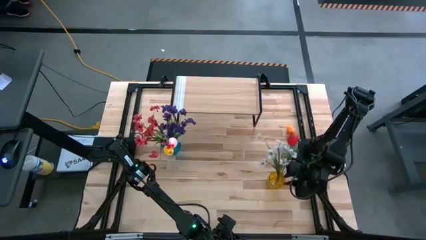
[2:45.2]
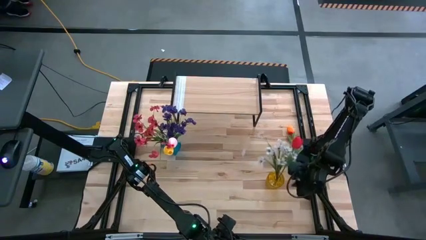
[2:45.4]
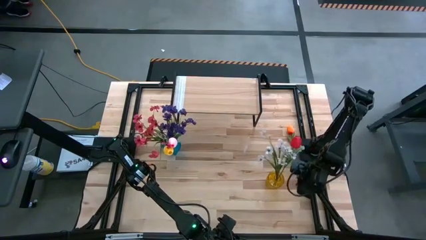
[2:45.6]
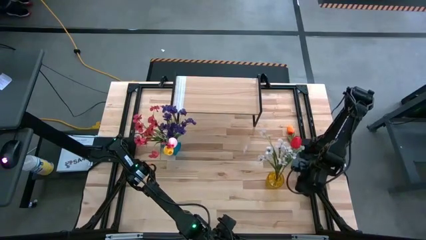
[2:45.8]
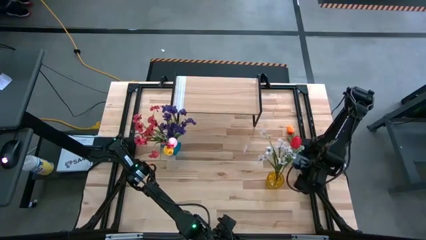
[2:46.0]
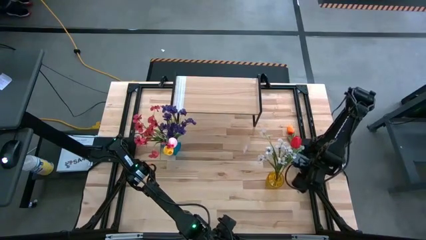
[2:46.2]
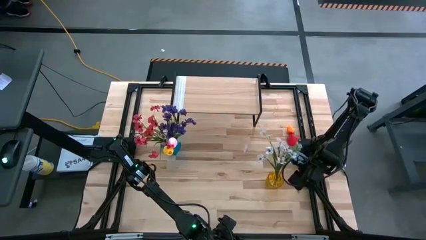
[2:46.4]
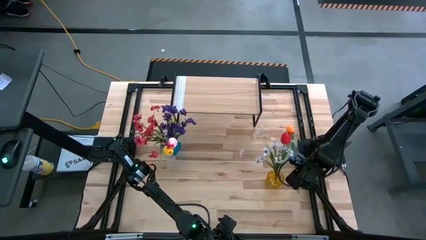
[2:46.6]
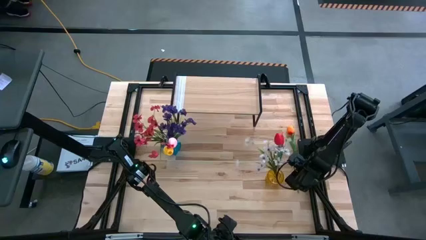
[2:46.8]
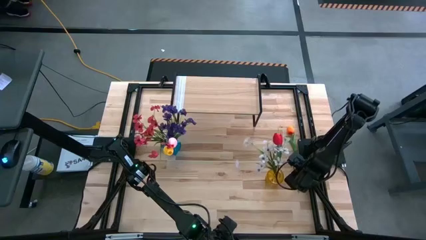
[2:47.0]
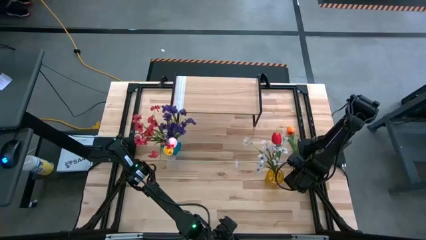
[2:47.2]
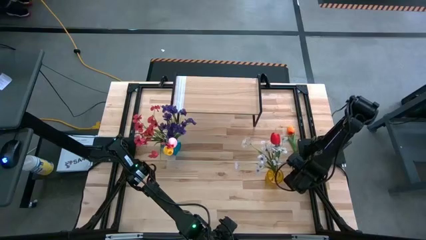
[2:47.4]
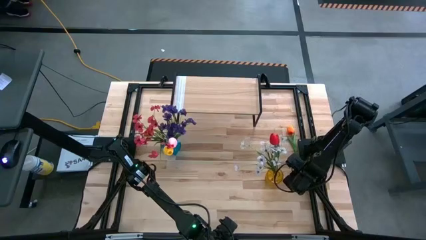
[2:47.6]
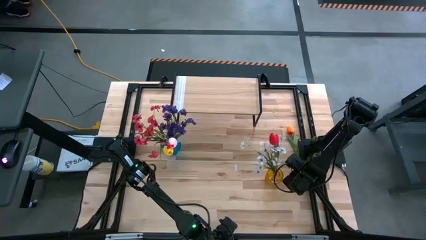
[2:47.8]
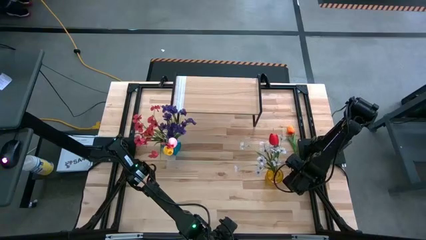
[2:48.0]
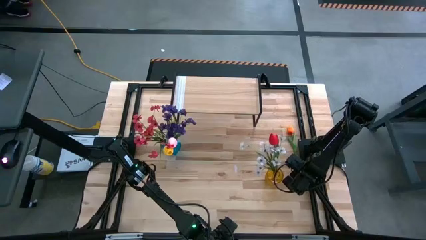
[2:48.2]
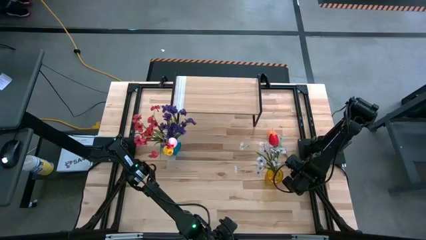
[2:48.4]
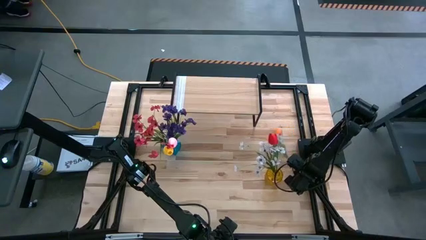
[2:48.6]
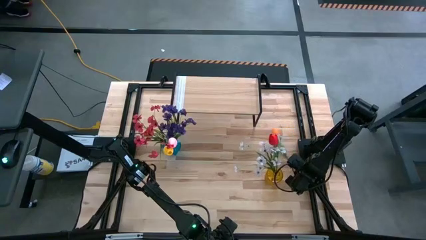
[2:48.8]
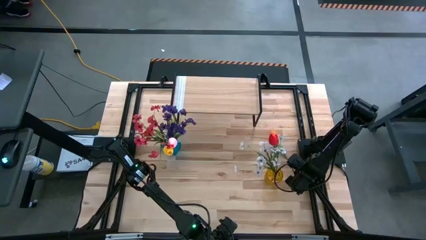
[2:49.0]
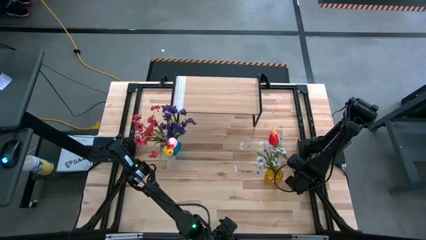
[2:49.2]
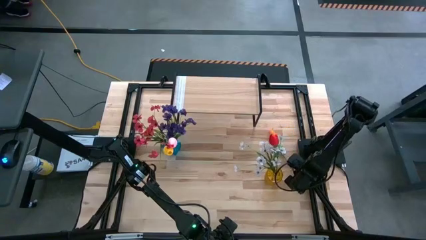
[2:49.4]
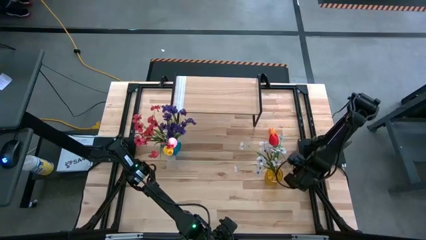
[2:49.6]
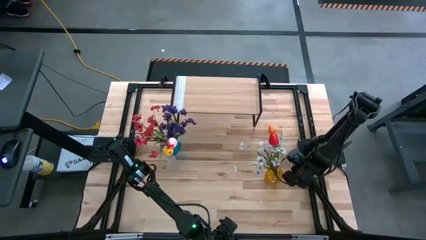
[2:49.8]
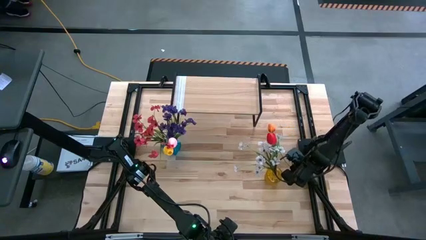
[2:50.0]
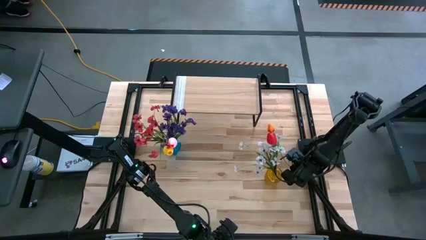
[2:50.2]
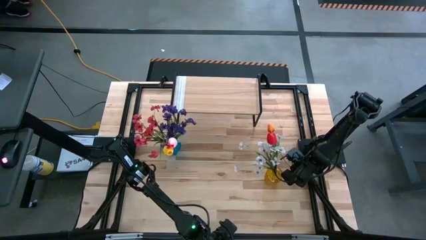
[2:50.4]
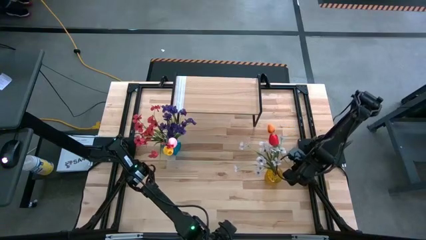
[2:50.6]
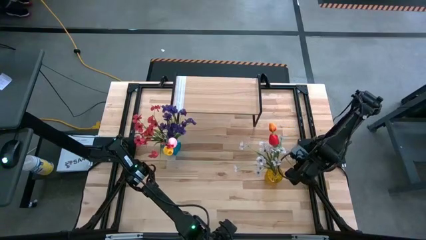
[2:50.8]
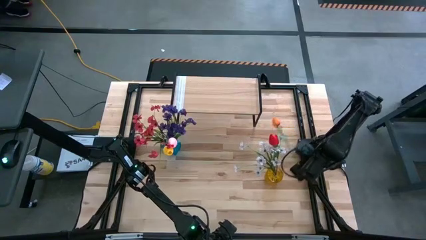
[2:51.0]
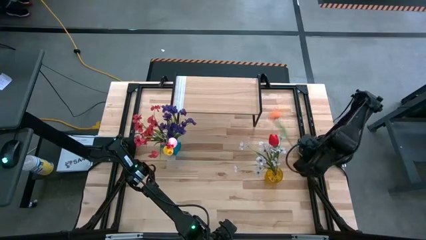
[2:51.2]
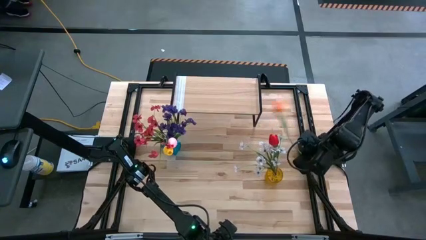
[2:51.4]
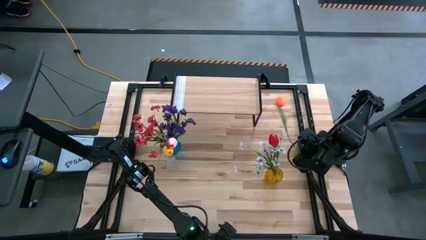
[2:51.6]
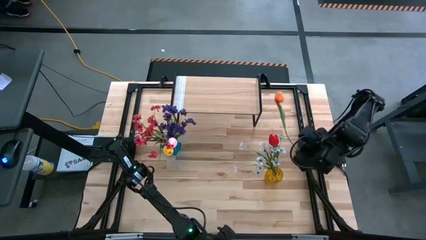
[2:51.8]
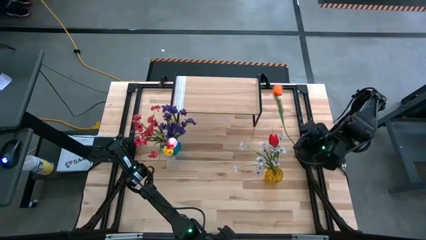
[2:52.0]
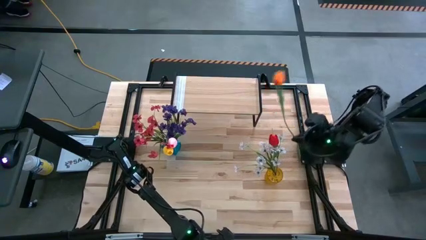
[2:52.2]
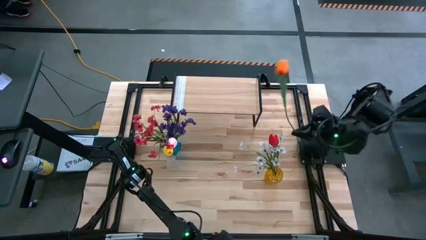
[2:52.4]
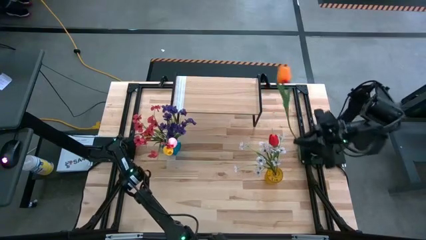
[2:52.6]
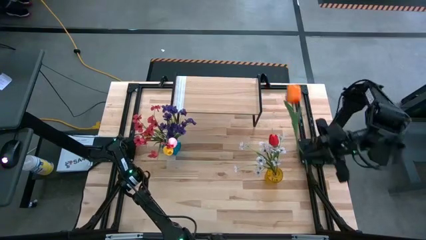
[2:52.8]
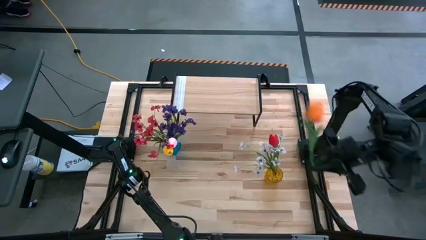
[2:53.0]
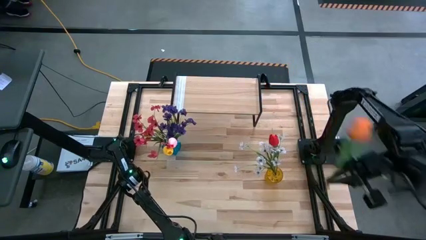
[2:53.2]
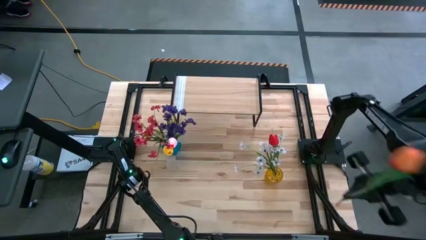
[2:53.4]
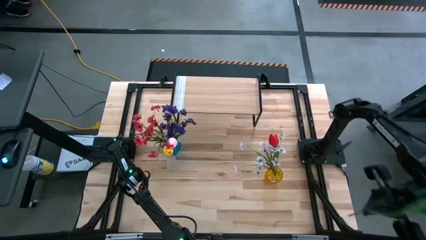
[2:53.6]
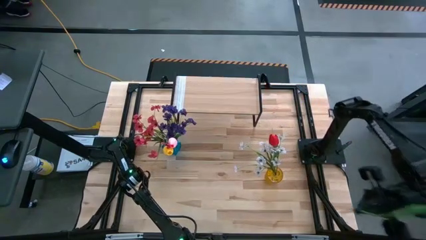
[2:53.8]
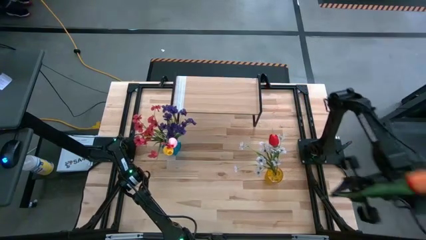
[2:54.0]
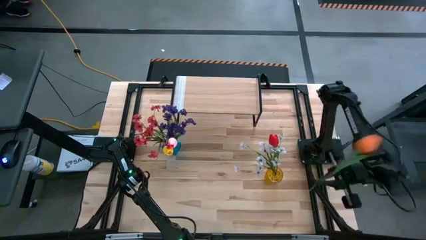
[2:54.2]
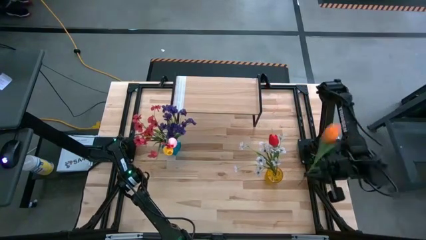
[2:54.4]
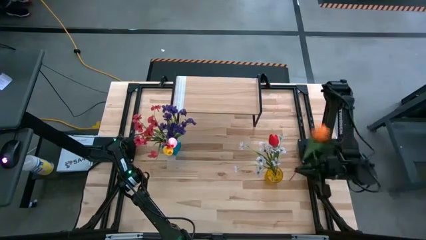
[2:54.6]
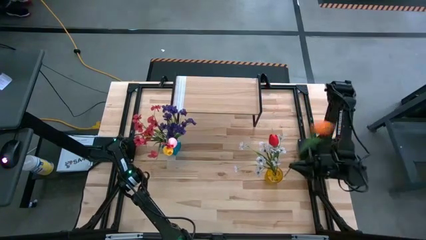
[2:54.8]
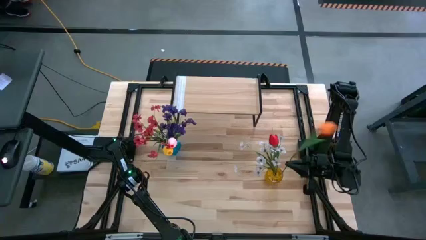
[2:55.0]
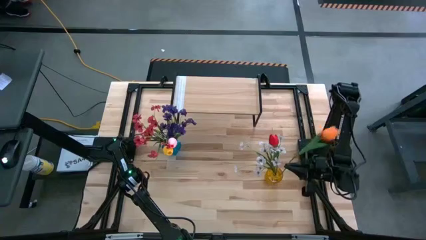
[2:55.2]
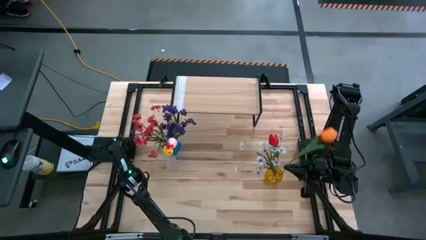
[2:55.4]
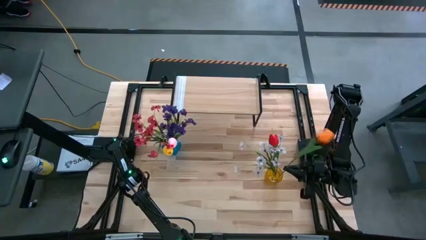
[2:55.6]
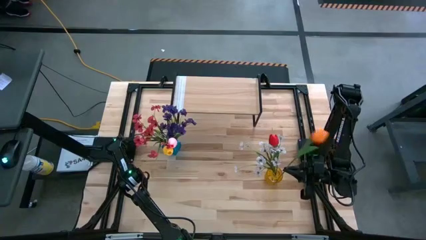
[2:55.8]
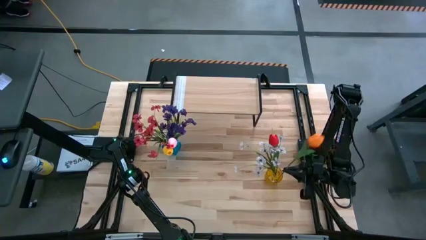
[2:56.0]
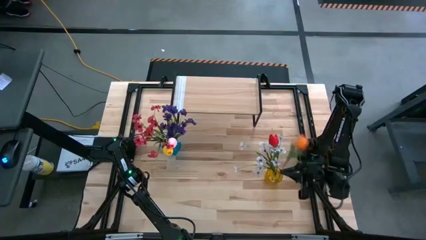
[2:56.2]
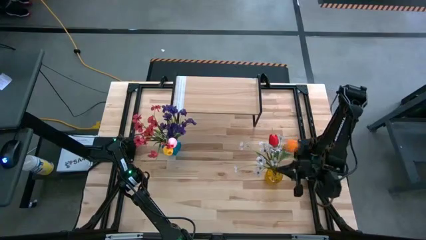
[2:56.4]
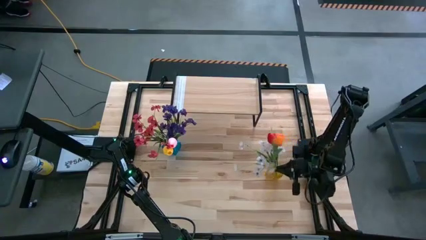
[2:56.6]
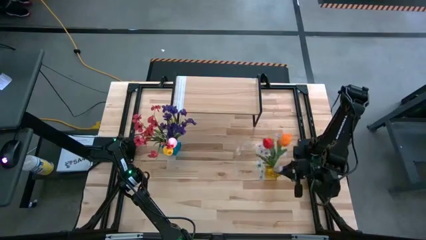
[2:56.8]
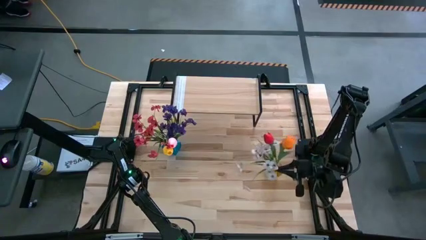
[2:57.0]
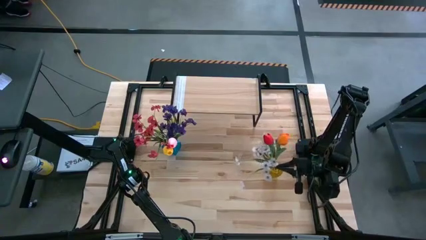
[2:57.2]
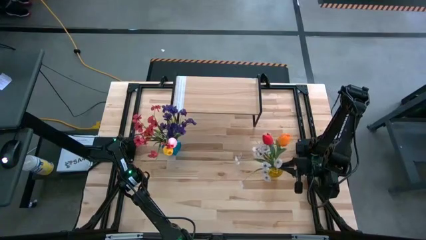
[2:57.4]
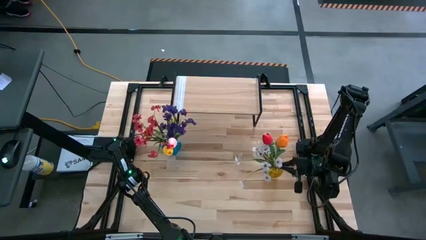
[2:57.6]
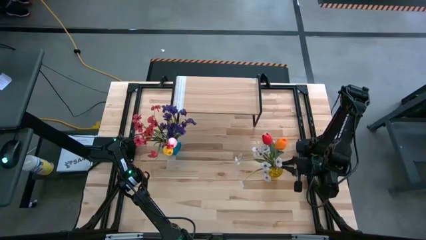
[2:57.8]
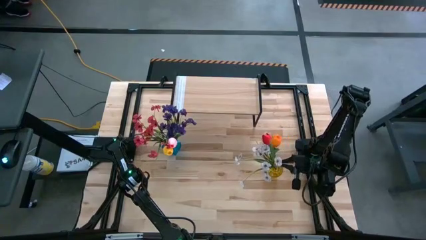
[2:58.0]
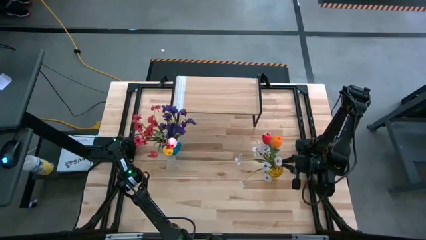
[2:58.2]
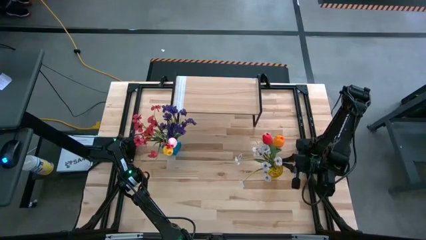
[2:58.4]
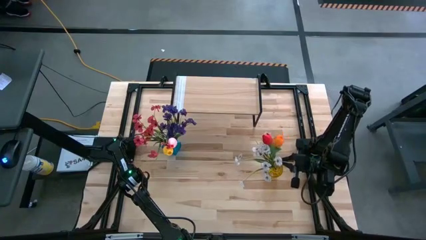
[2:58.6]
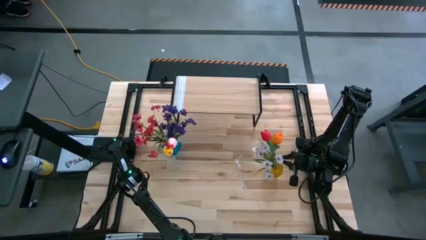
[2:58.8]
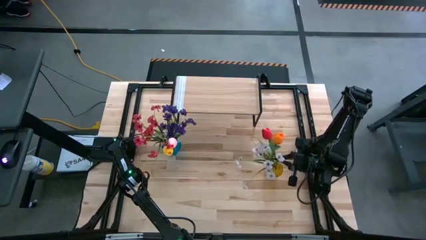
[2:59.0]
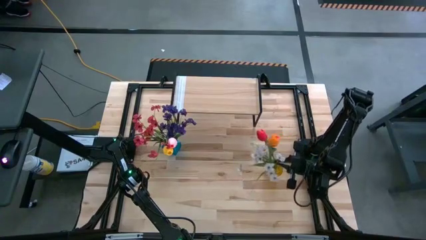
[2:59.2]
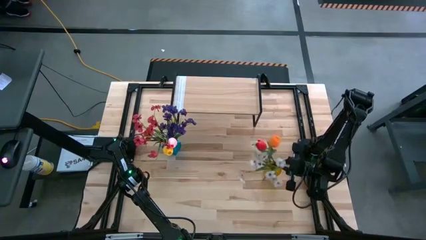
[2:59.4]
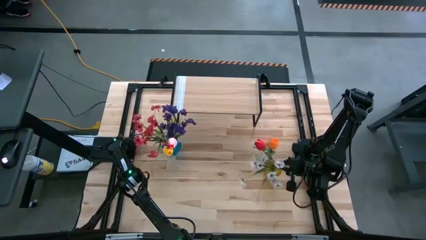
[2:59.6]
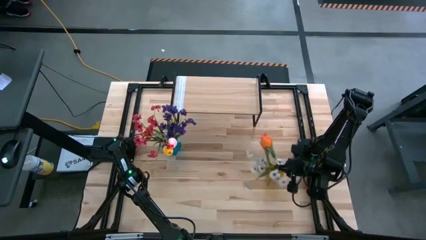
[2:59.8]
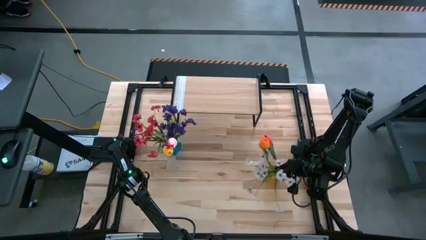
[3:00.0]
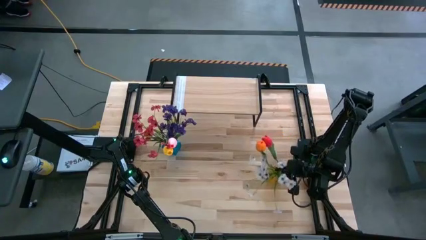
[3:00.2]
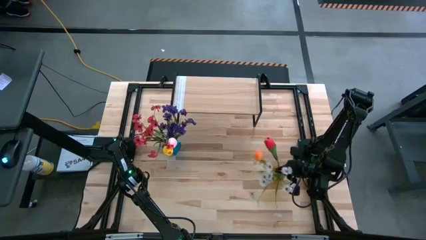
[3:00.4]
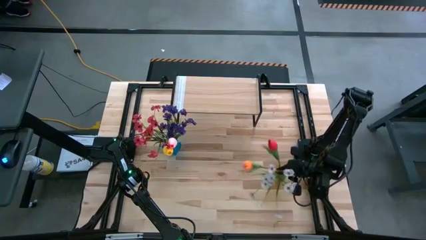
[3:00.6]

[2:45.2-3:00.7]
Task: Pick and place flowers into a vace then onto a shelf
Put the orange flower into the yellow vase
